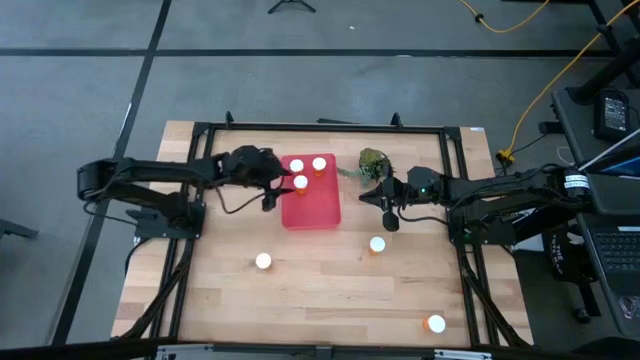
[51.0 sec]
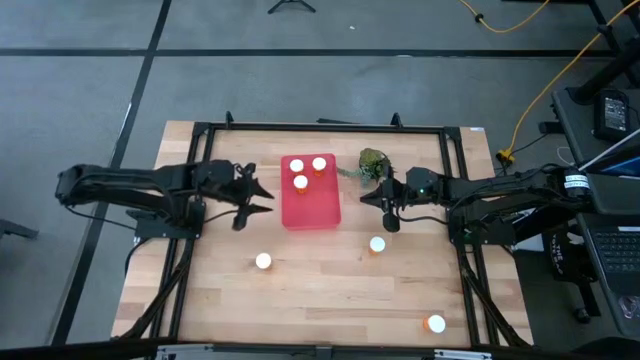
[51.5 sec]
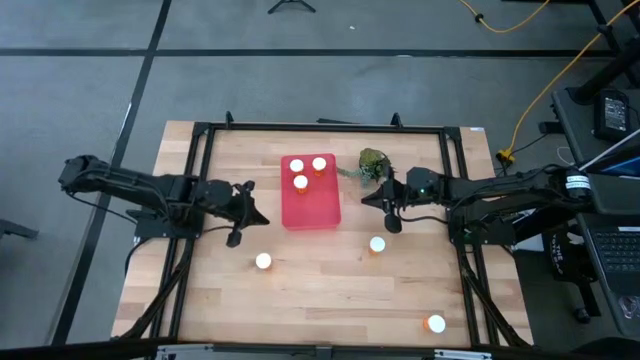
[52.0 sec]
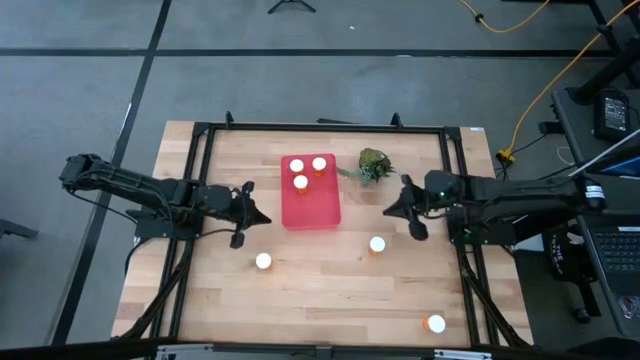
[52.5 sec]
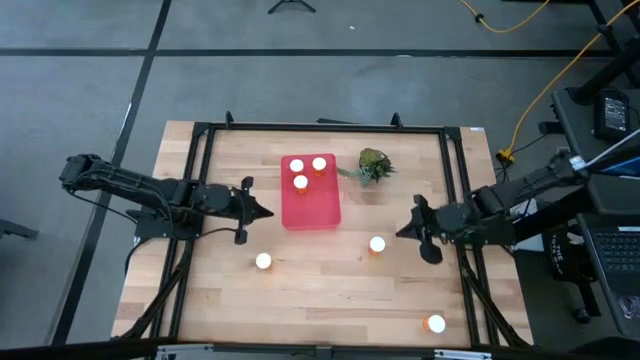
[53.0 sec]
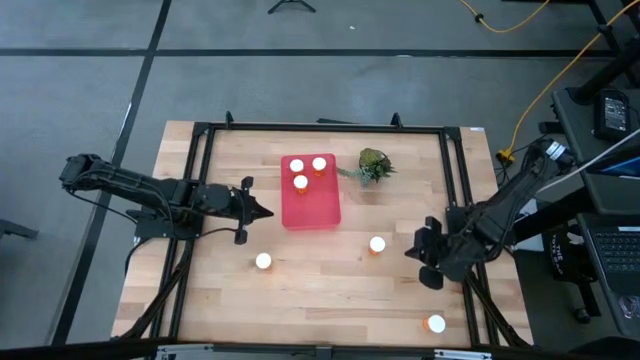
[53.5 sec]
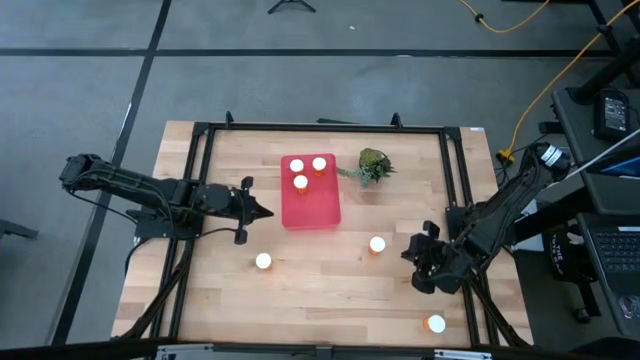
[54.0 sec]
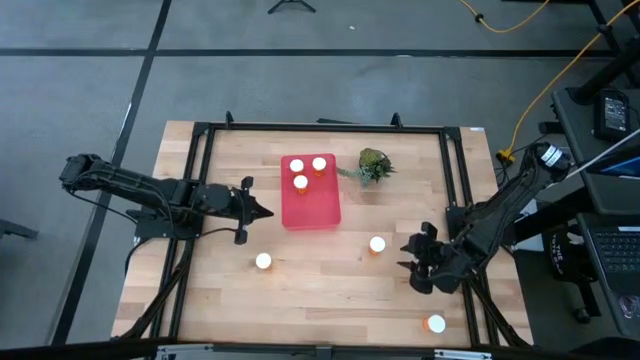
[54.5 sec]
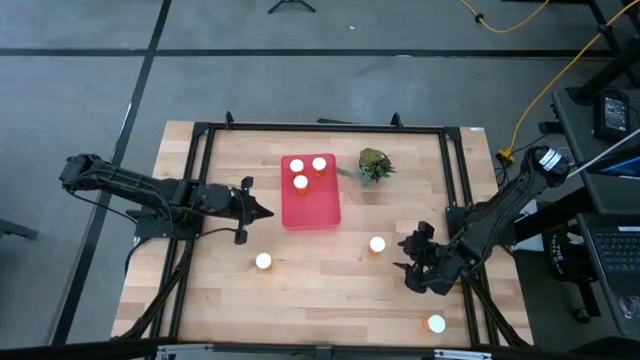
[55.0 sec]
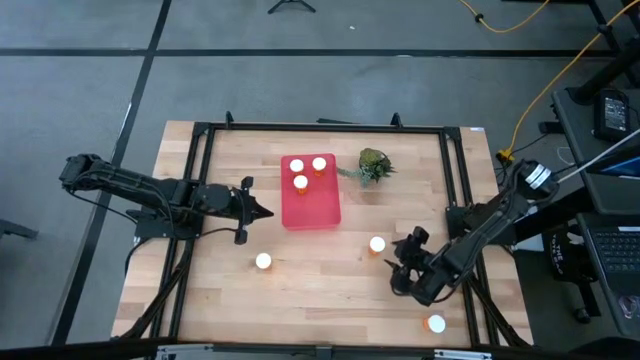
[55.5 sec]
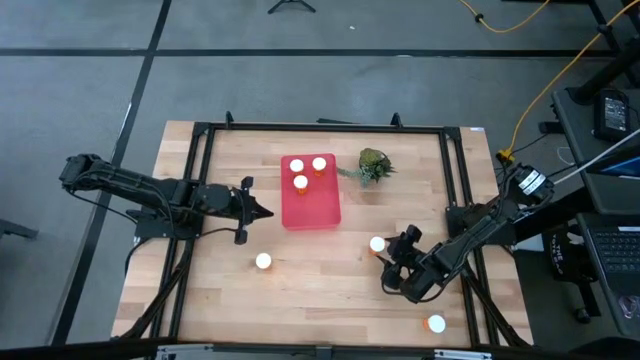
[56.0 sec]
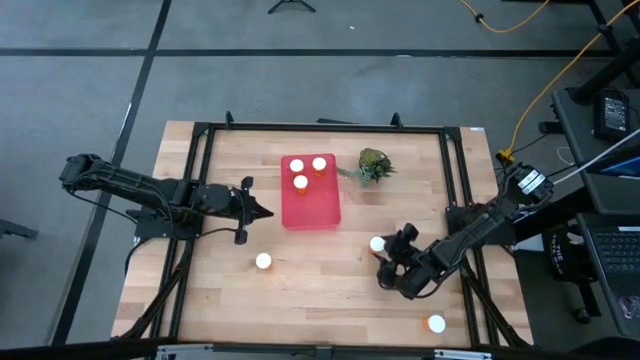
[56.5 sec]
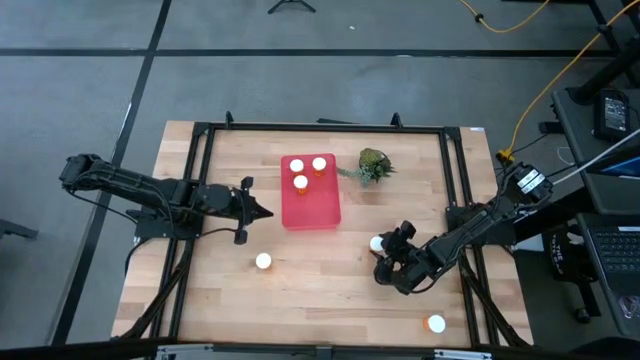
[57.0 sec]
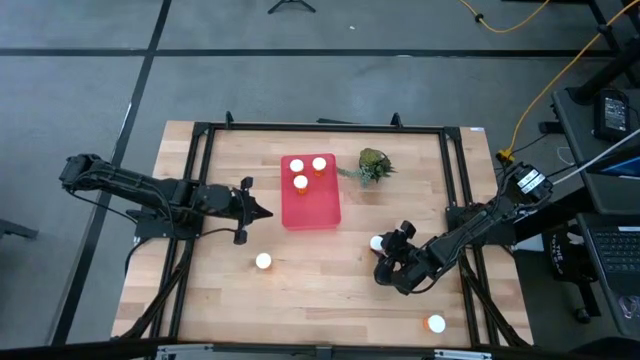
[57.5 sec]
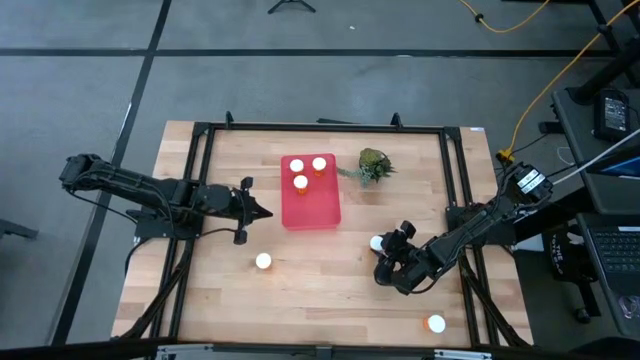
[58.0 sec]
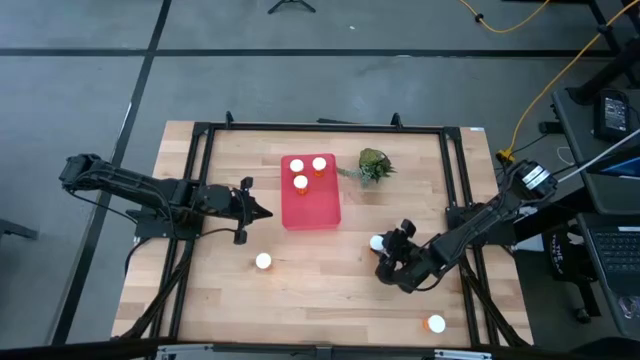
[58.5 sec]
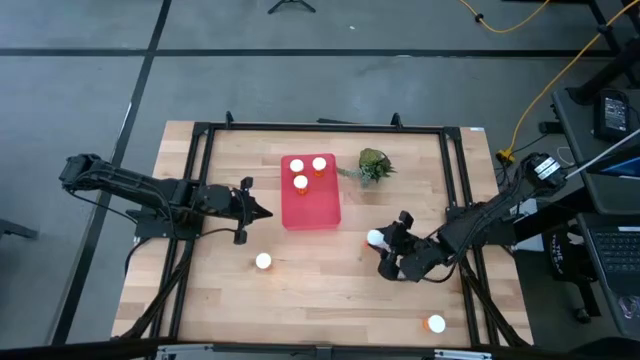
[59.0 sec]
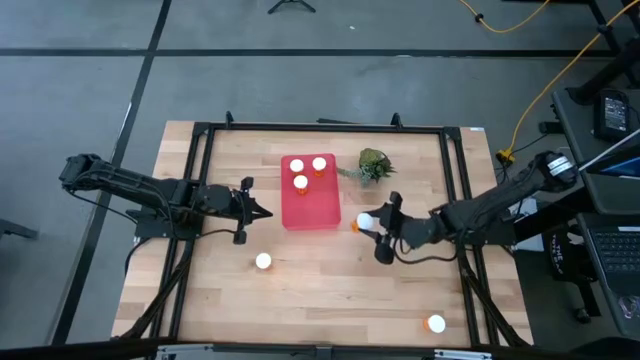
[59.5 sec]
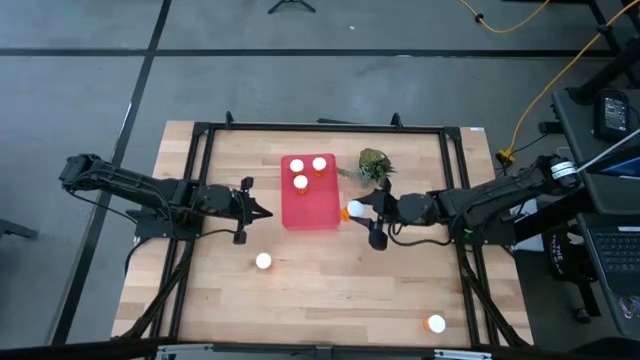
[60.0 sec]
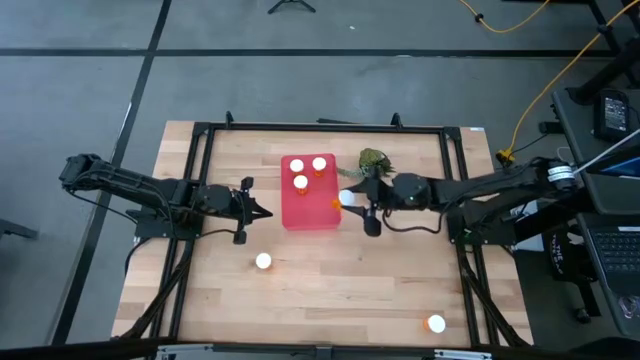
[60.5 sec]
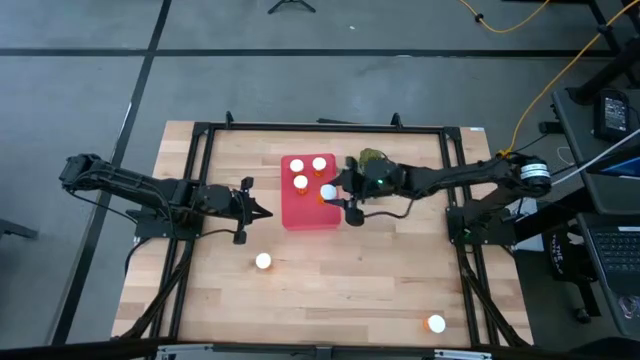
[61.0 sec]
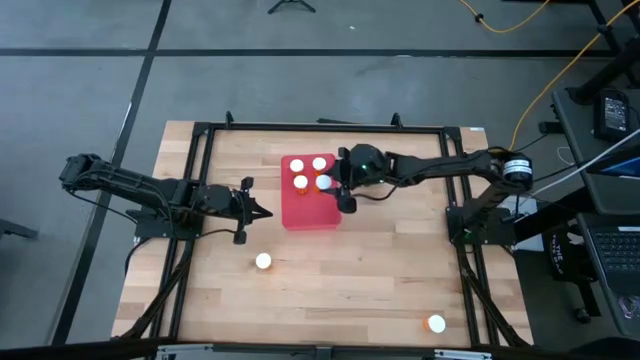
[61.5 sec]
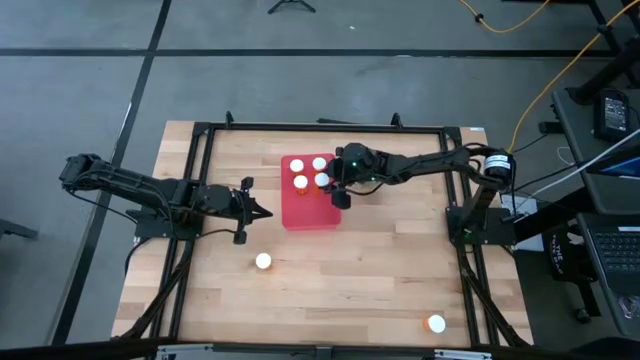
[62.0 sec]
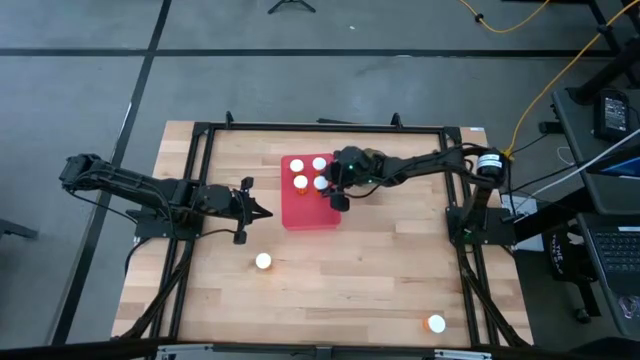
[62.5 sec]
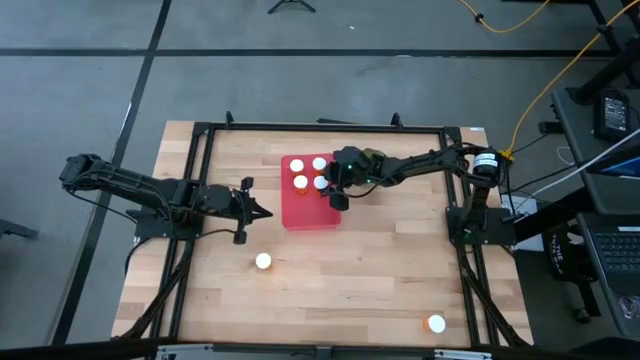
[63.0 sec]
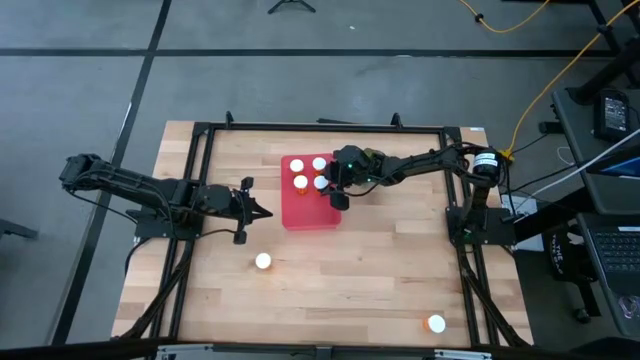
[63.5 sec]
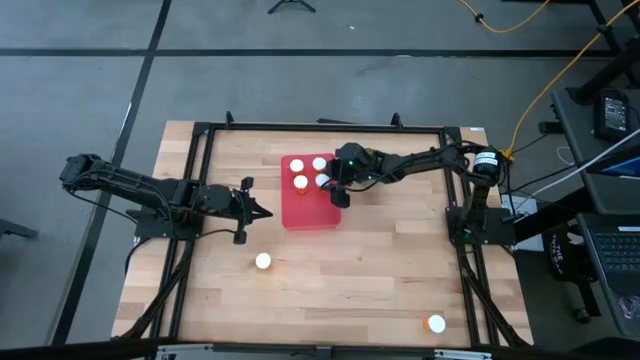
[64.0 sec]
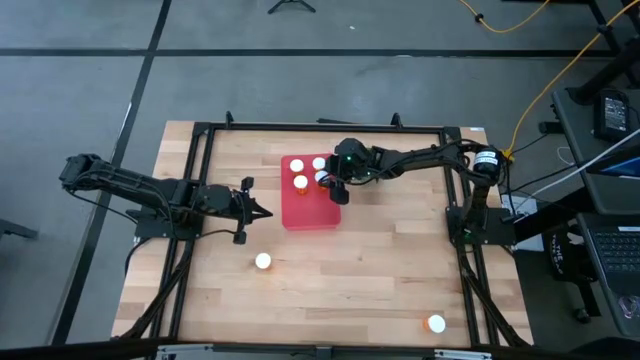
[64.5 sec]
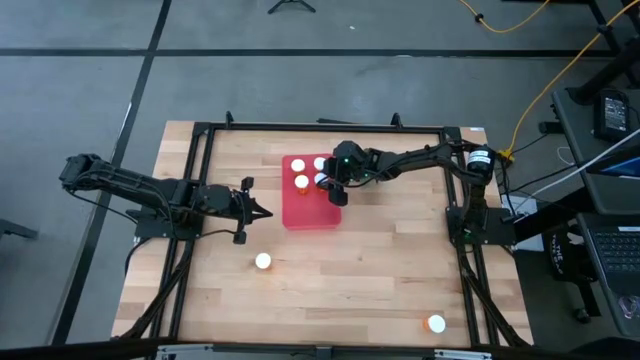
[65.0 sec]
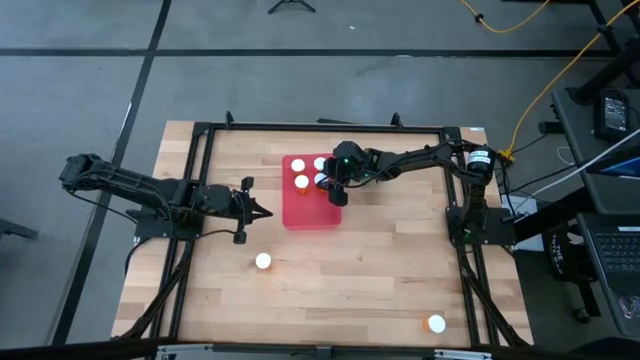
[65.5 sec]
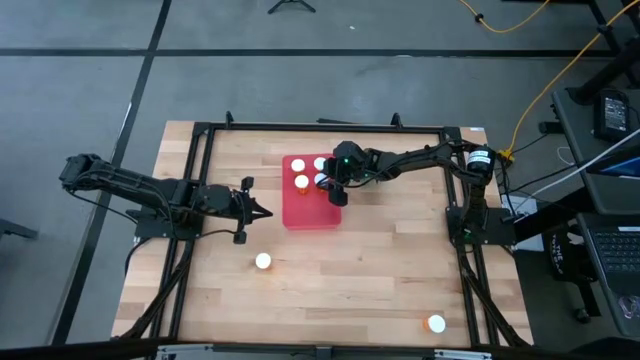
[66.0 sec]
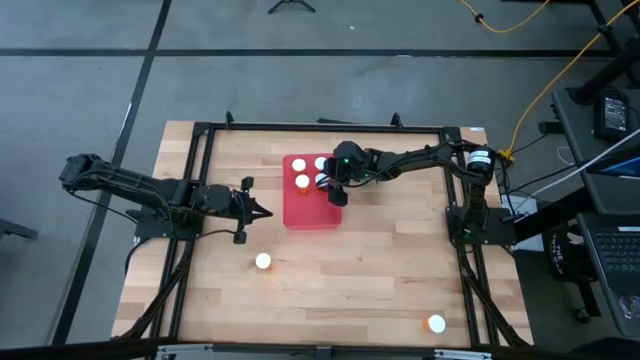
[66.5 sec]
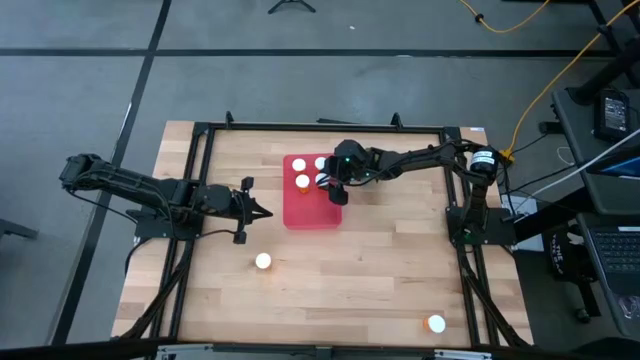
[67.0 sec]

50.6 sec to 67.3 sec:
Task: Pick and place pill bottles into a basket
Put the orange pill bottle into the red bin

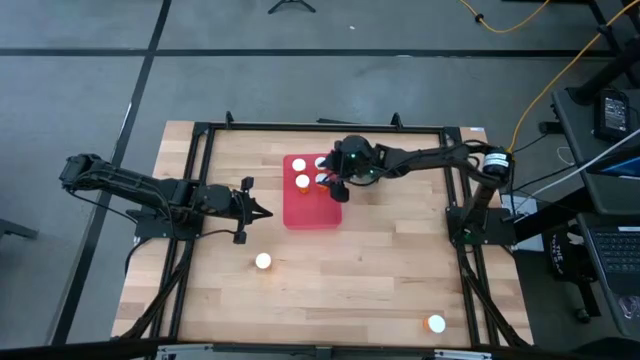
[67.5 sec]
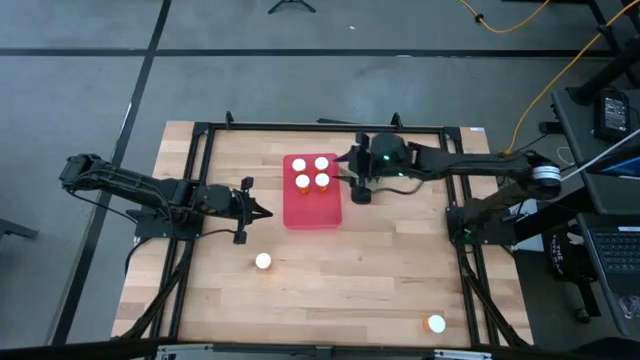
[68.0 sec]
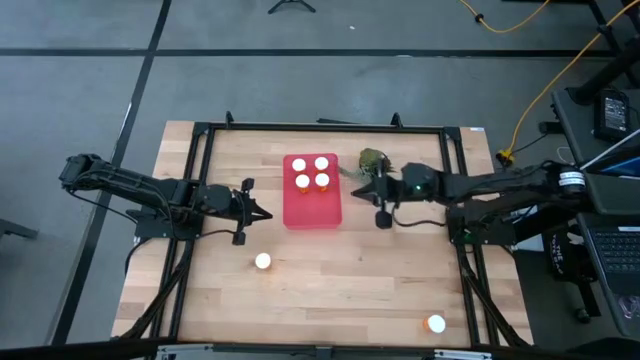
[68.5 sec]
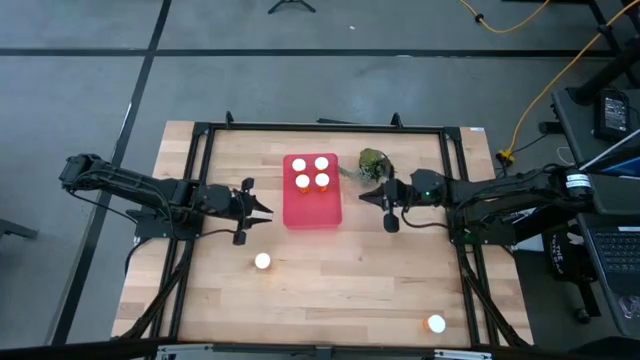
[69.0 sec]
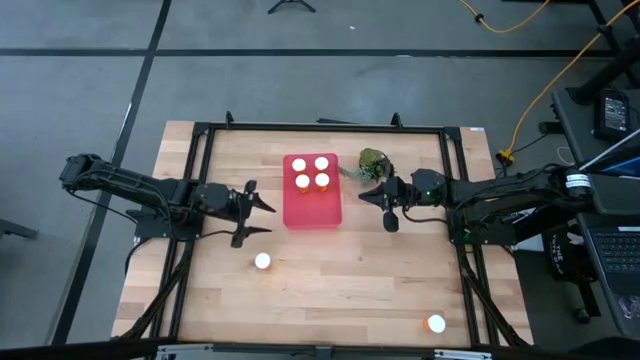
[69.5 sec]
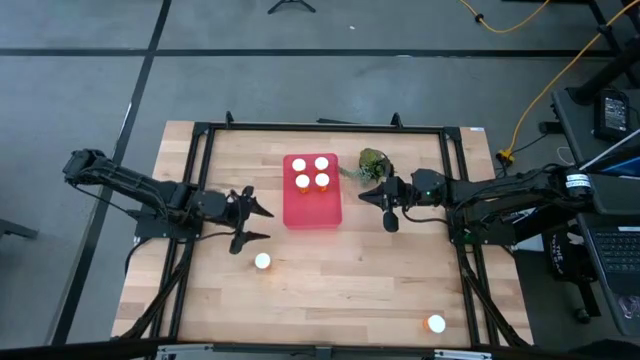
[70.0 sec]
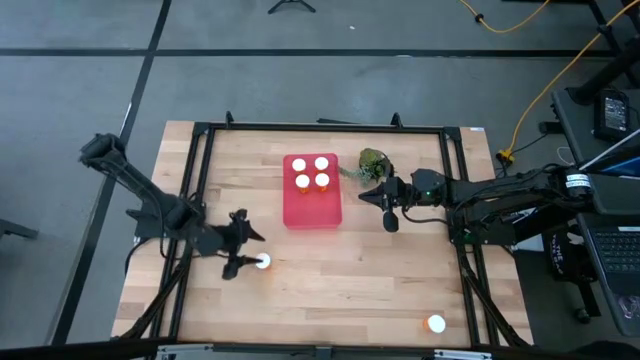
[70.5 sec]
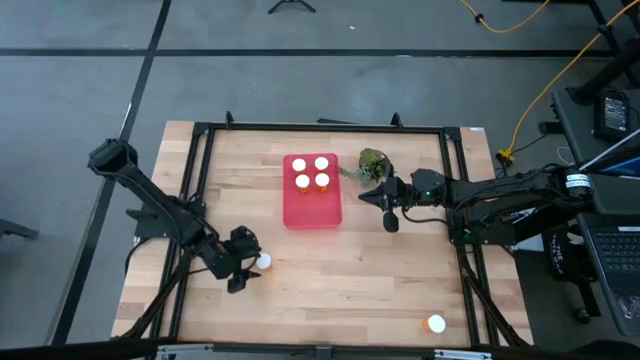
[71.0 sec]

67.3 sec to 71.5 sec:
Put the orange pill bottle into the red bin
